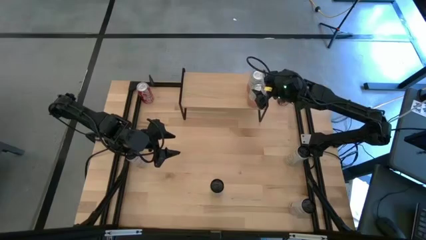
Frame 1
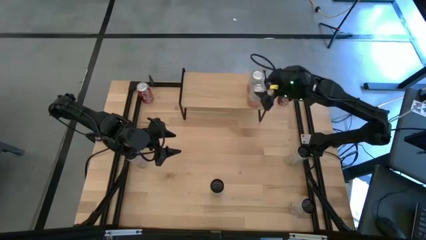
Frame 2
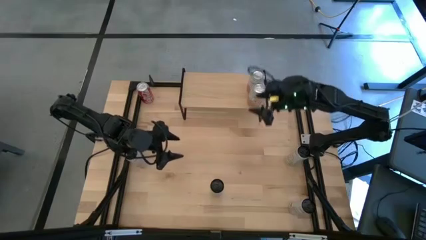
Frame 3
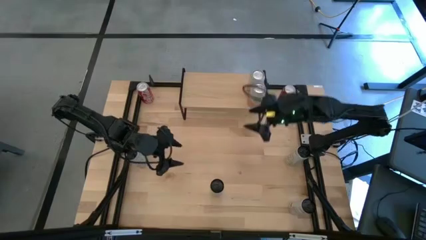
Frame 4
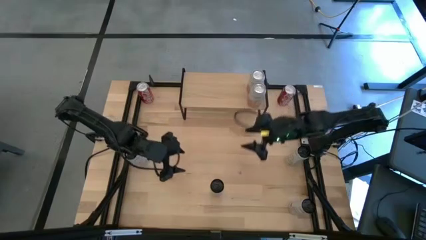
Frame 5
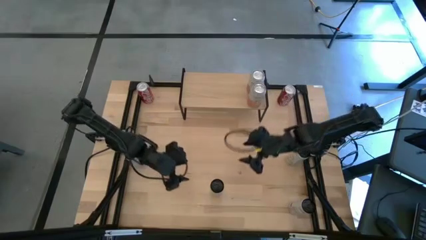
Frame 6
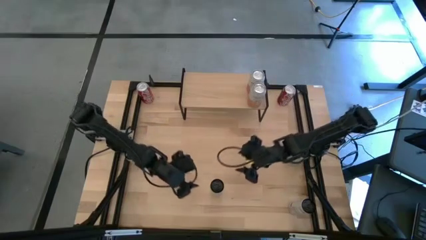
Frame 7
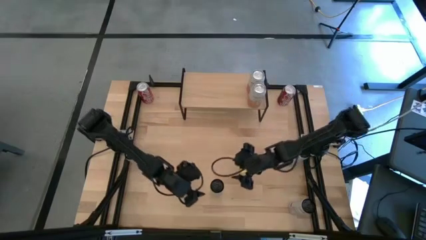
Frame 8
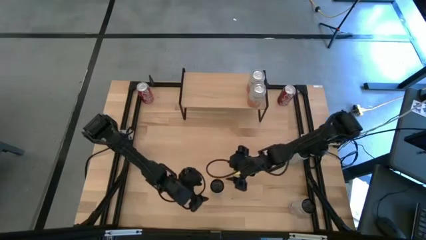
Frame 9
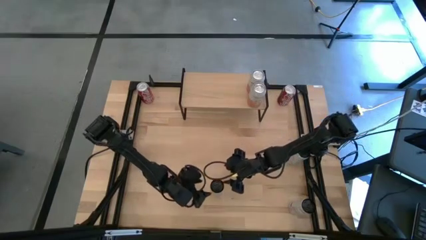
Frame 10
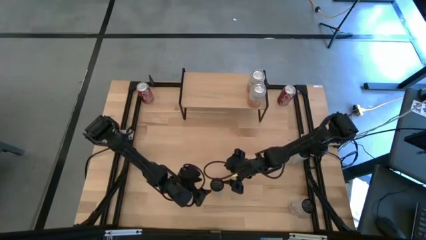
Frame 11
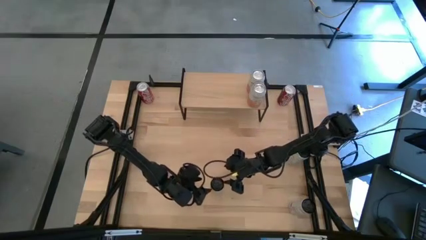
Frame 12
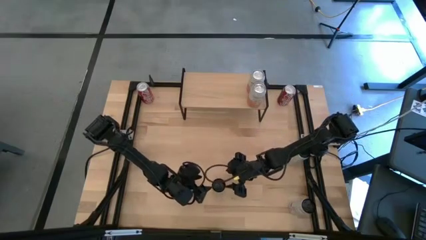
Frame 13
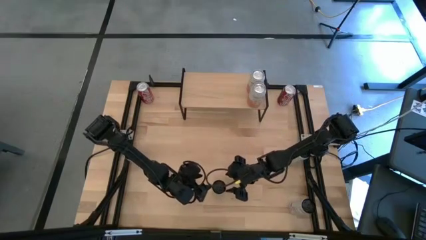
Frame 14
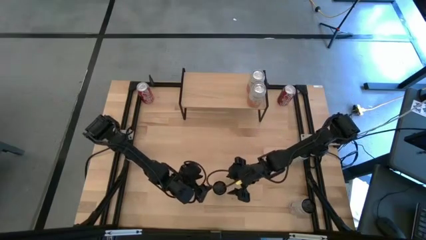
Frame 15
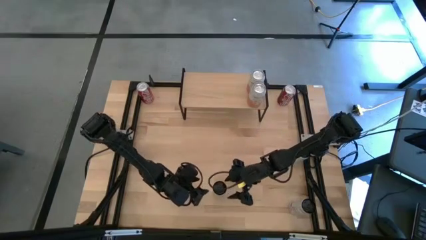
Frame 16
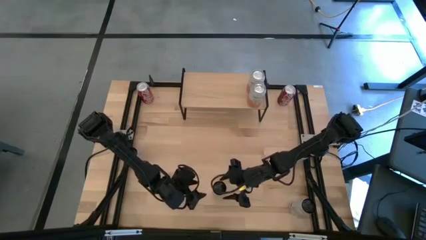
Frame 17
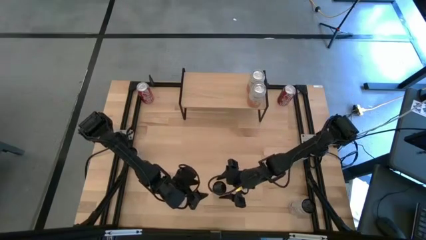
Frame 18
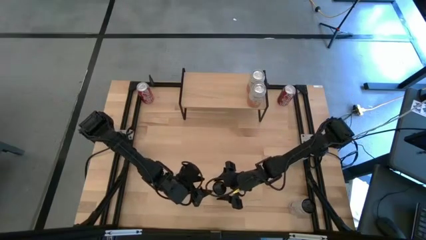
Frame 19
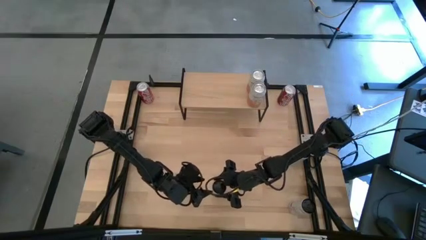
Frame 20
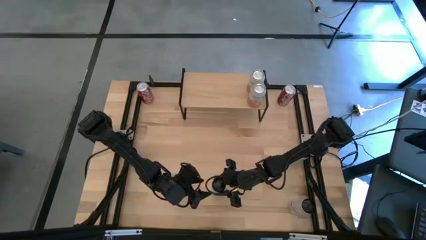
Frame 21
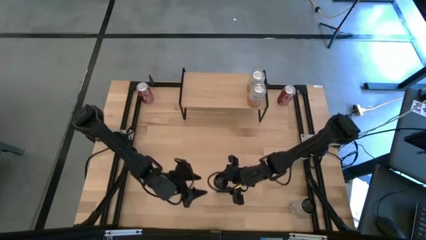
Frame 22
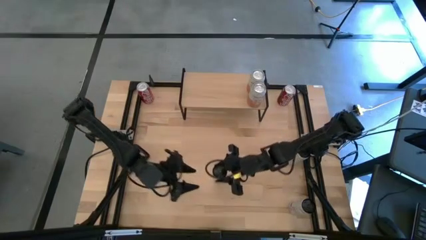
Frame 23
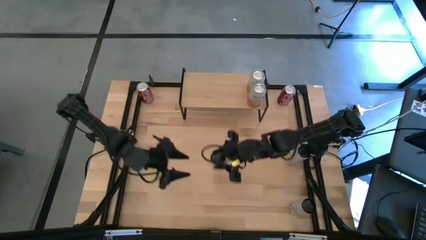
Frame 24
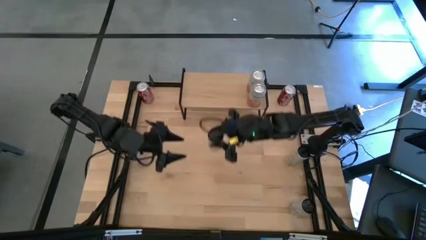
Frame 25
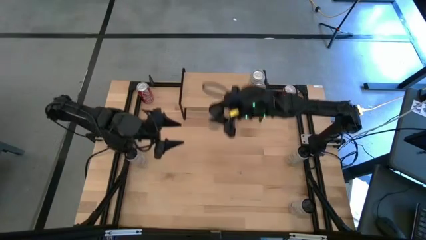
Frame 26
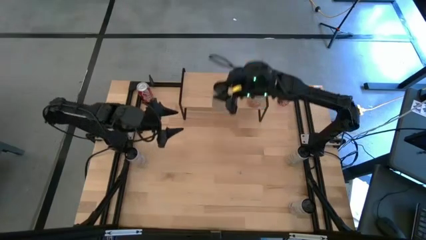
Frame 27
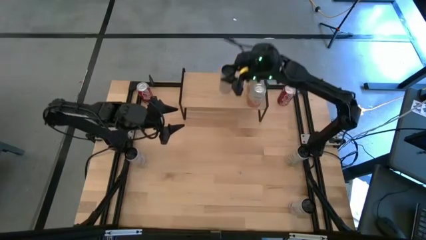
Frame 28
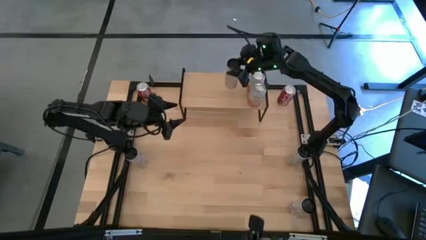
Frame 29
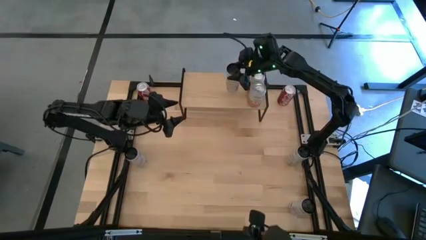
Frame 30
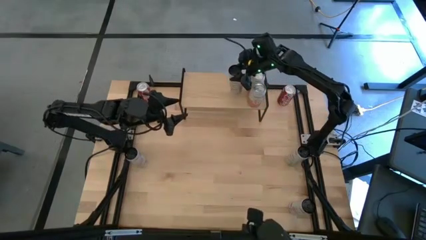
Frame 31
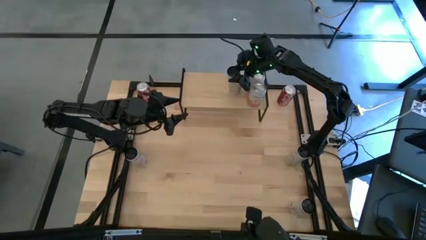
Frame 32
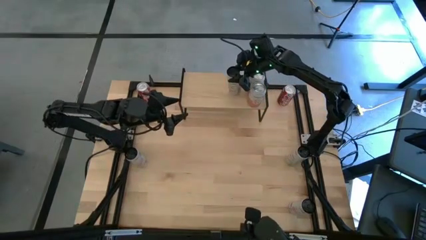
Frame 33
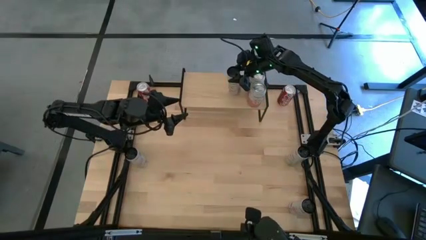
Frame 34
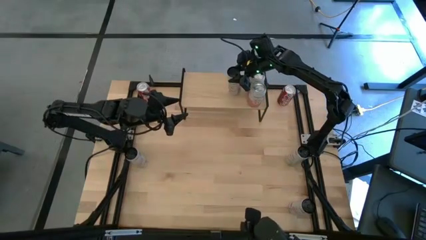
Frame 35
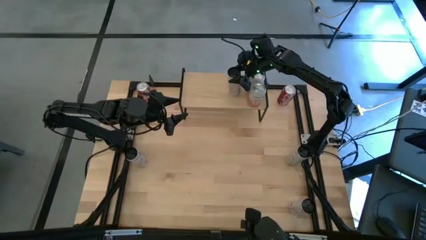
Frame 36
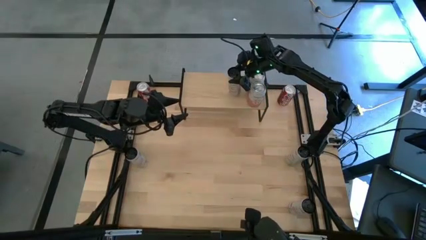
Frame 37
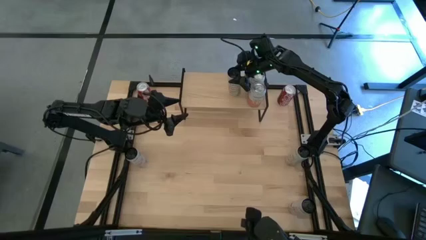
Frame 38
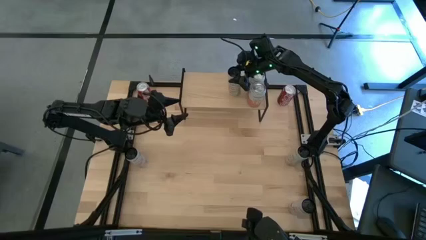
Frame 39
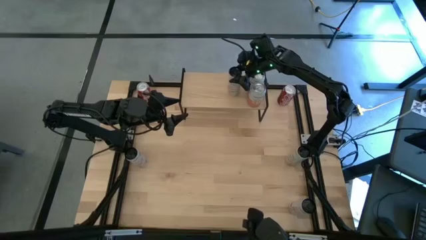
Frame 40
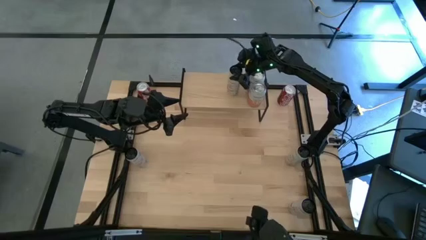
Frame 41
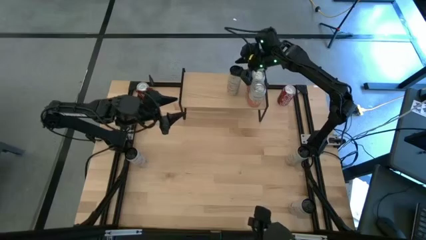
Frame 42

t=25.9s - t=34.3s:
Task: Place canned beverage on shelf
Put the bottom center white and yellow soda can on the shelf

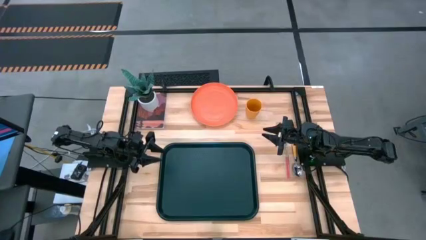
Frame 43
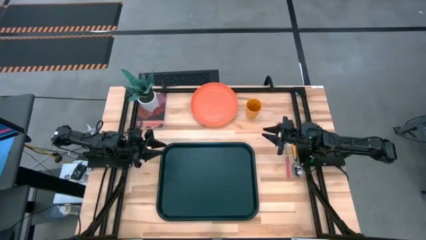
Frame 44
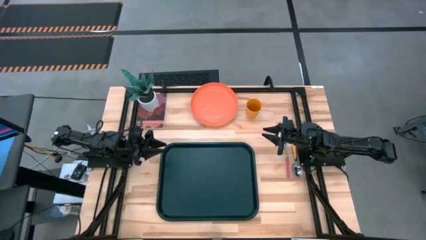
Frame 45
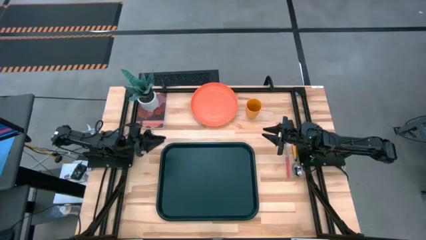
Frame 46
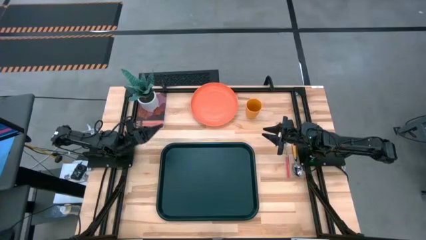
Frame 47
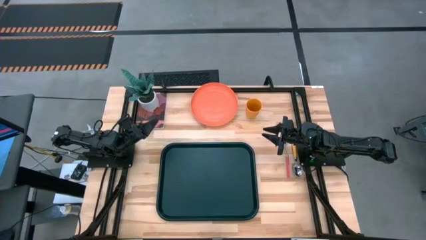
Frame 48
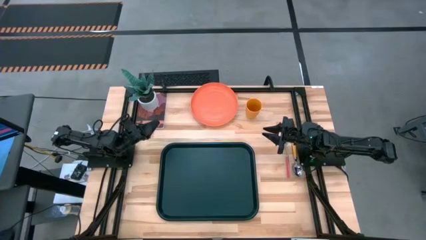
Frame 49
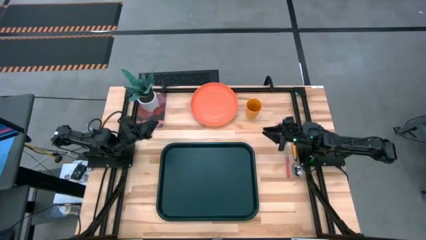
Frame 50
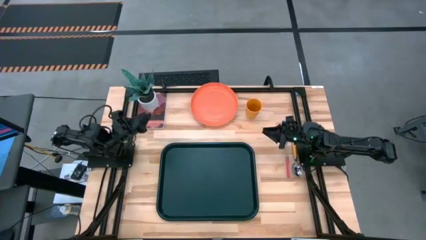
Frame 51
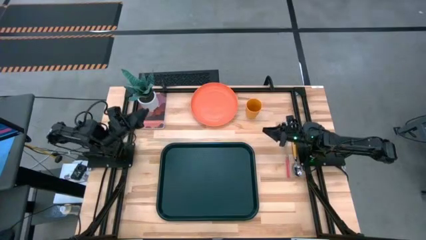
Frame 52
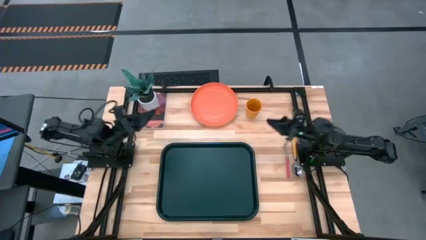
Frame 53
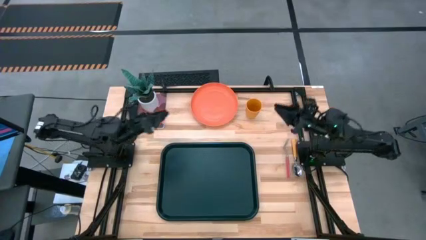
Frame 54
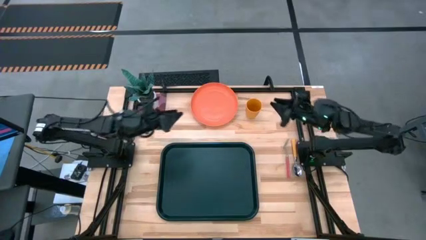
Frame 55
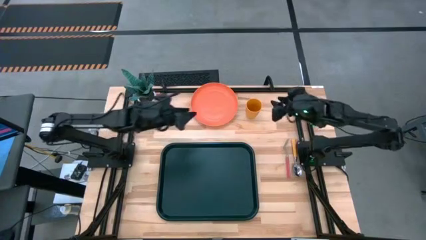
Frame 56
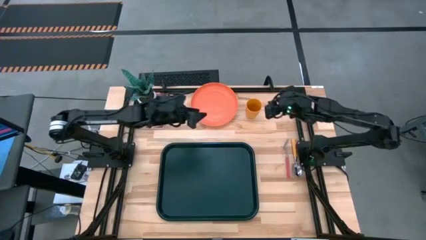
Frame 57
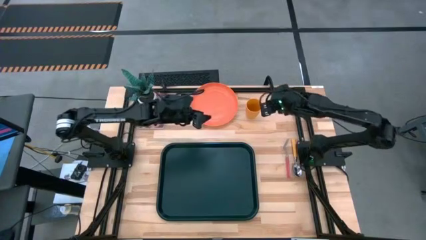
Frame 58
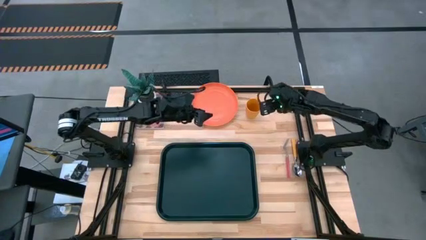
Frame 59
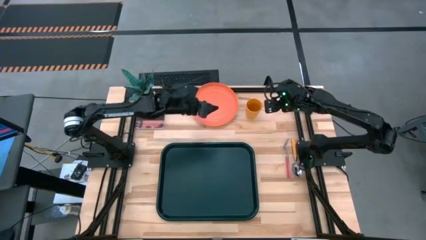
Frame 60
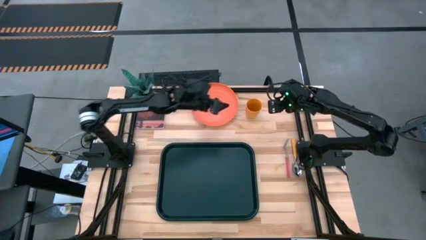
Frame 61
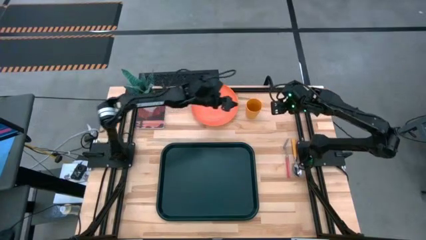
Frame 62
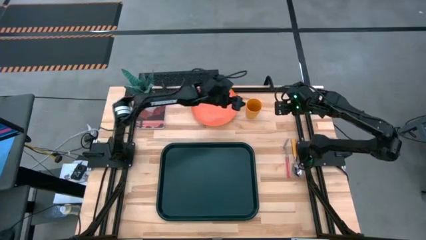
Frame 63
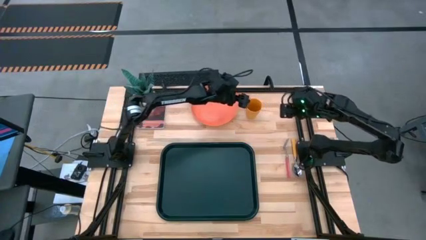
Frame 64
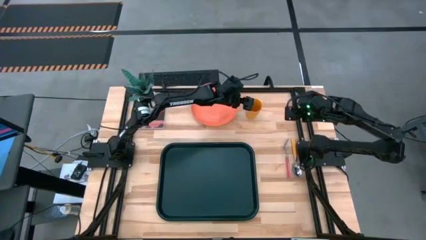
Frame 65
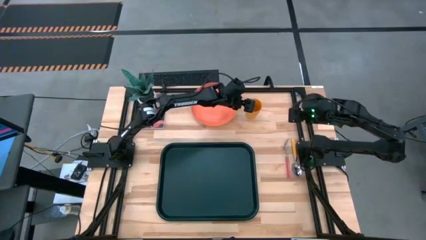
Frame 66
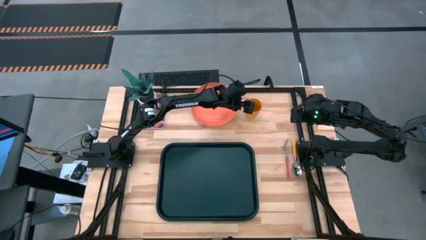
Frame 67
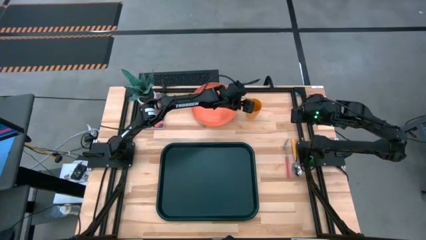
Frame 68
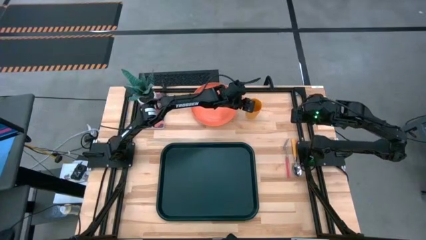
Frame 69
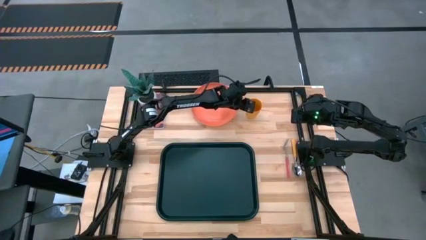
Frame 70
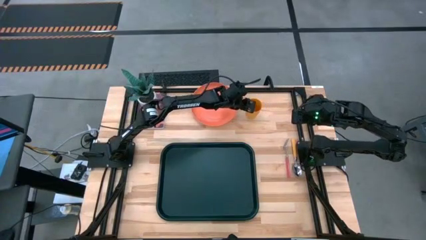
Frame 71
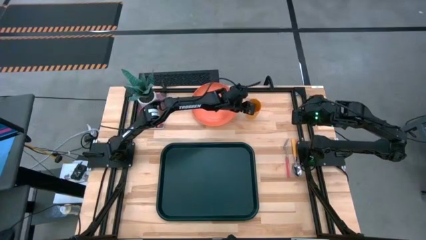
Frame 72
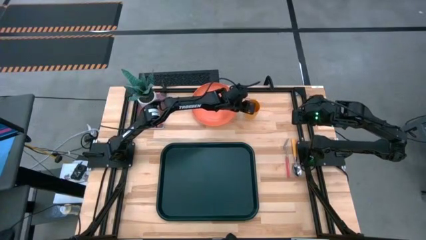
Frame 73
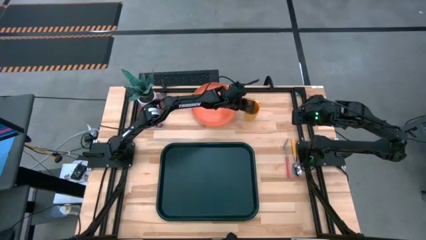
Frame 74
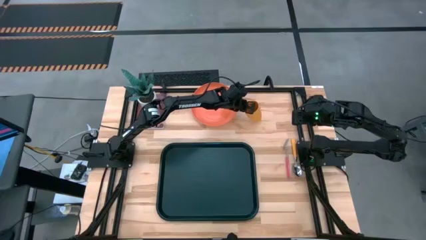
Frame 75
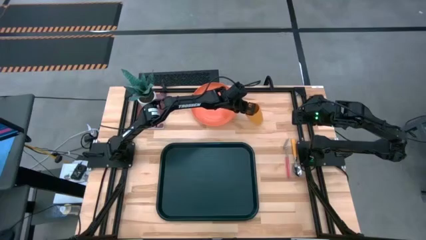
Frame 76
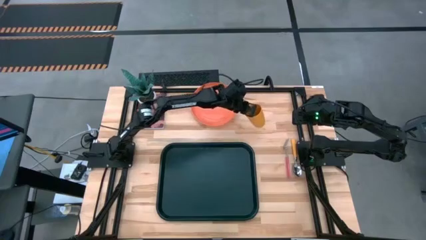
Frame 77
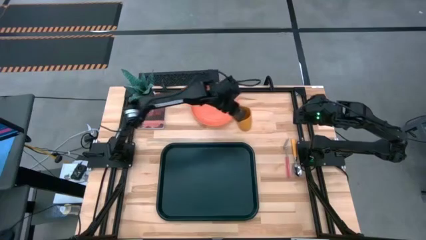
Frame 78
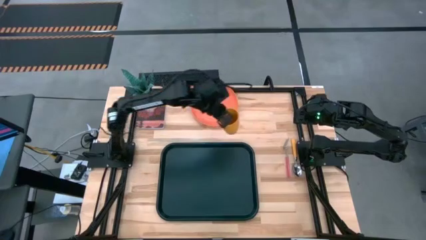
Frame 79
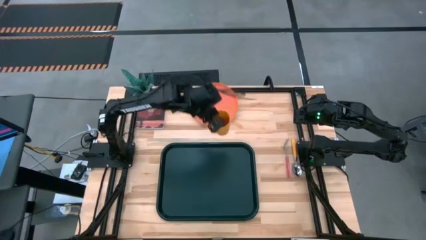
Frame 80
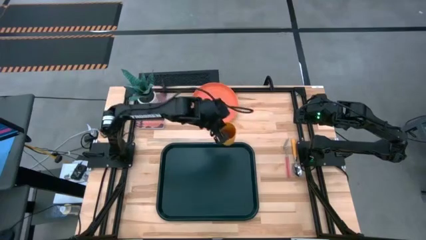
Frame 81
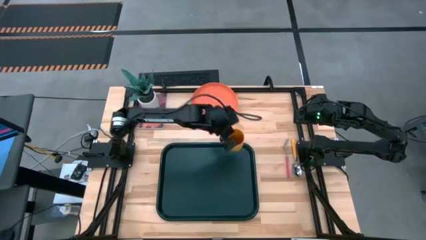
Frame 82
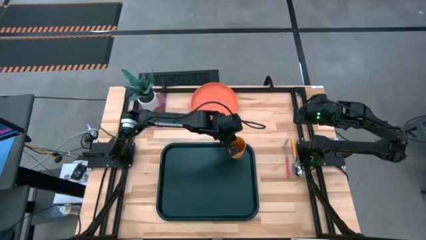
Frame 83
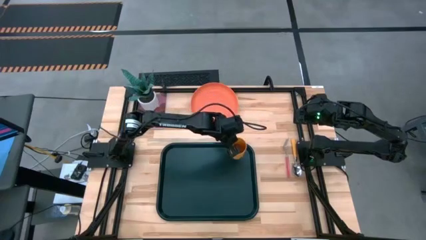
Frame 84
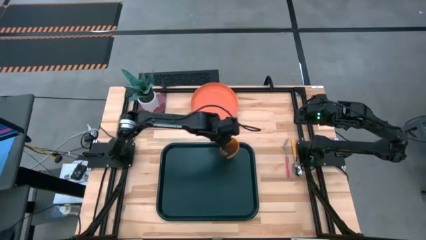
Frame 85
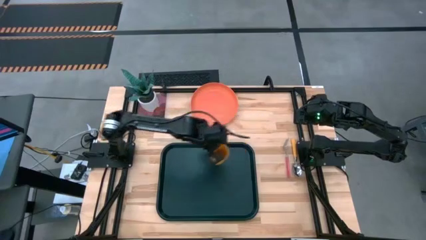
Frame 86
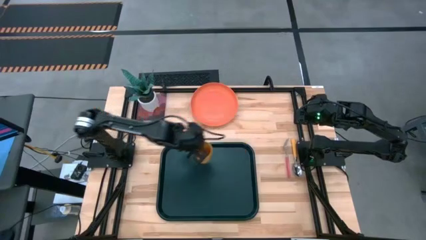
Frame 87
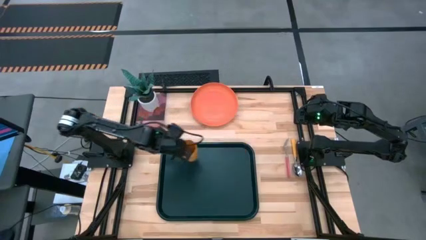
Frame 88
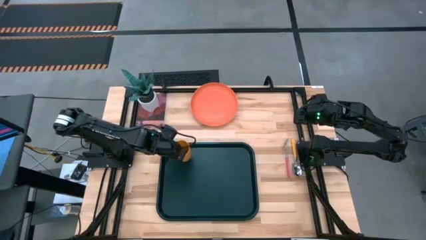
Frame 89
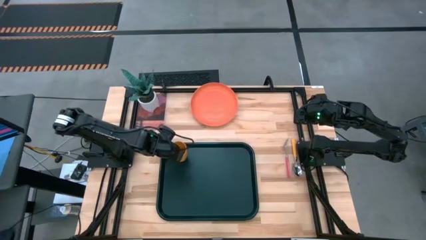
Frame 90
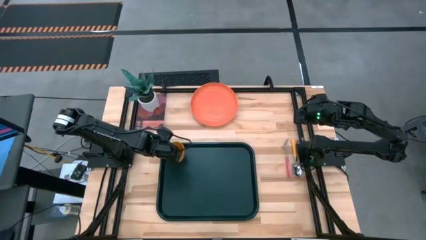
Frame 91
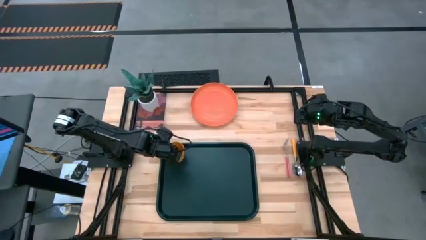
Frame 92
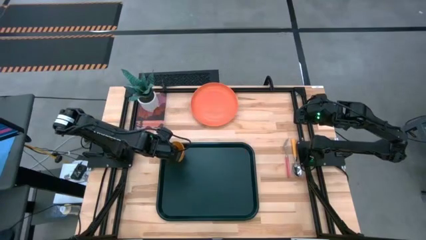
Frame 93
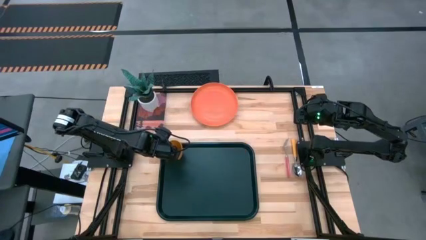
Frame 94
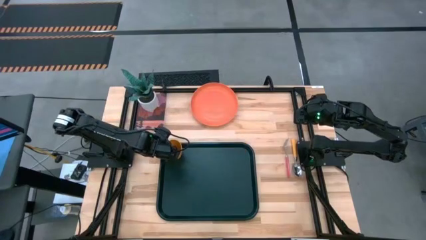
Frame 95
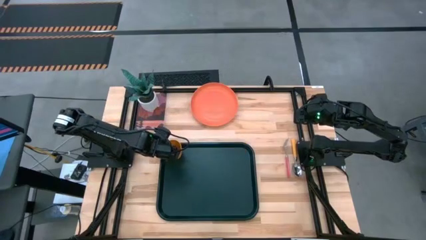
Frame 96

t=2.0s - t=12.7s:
Task: Pick and place plate/cup/fork/spoon on tray
Put the yellow cup on the black serving tray
